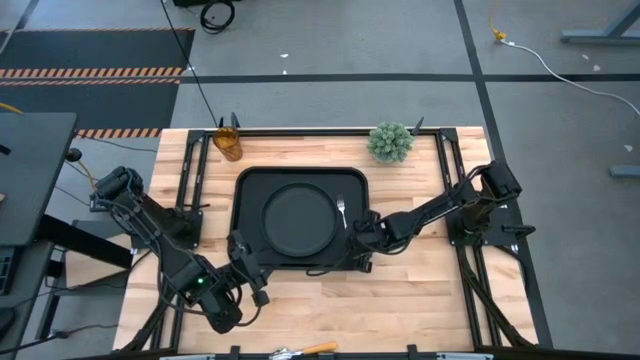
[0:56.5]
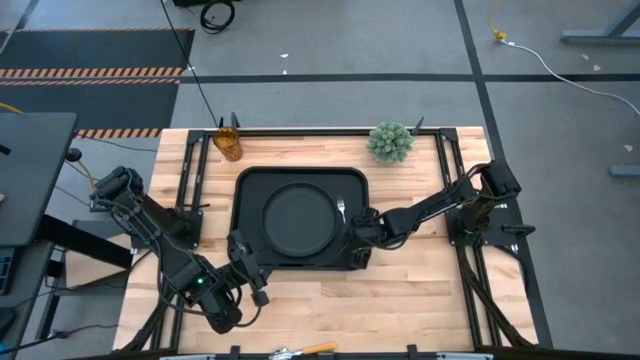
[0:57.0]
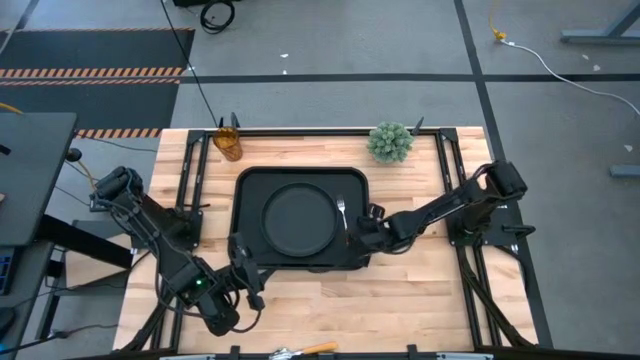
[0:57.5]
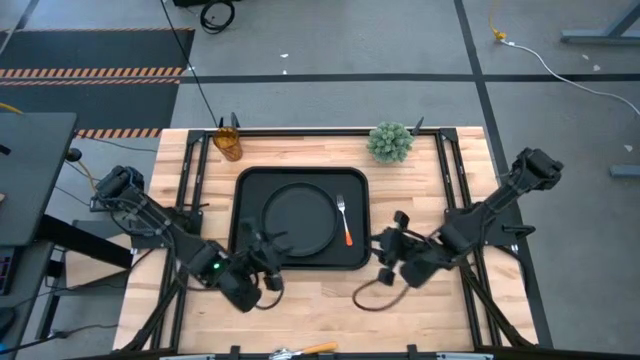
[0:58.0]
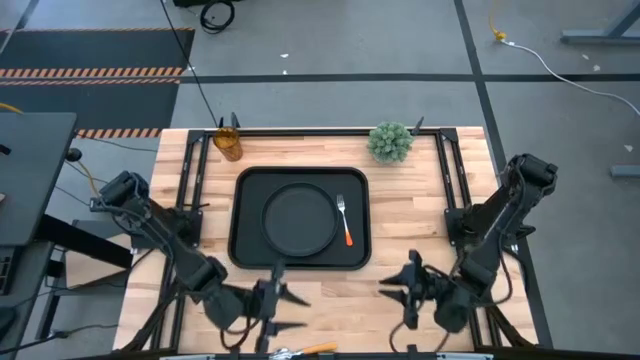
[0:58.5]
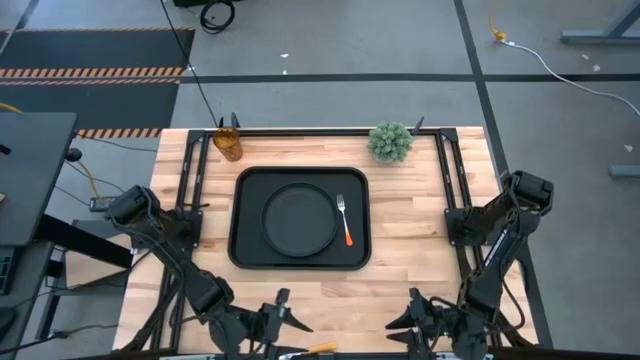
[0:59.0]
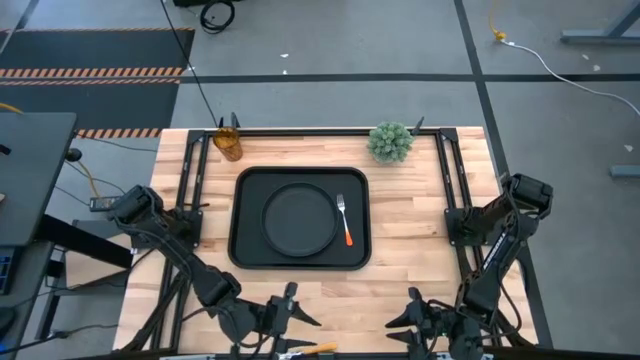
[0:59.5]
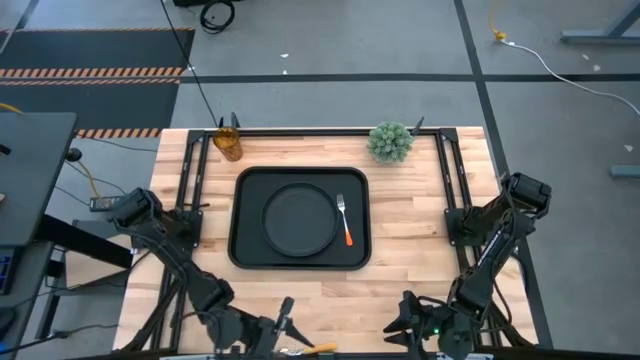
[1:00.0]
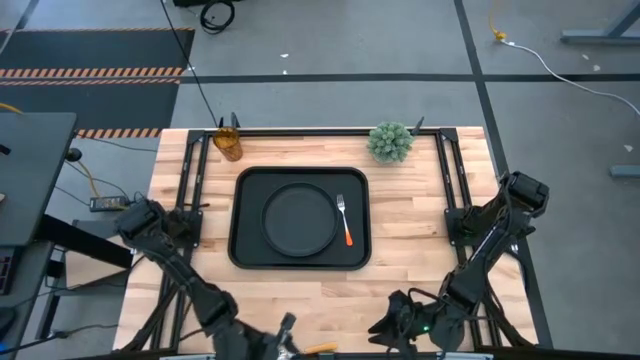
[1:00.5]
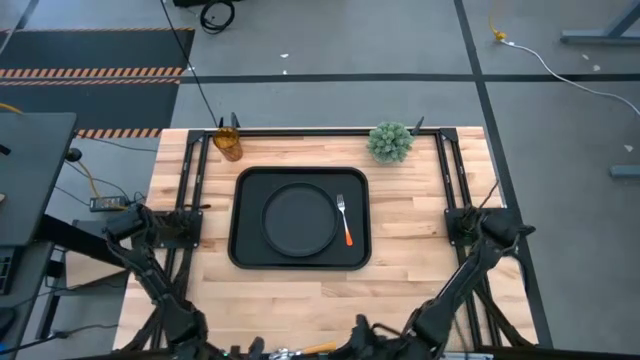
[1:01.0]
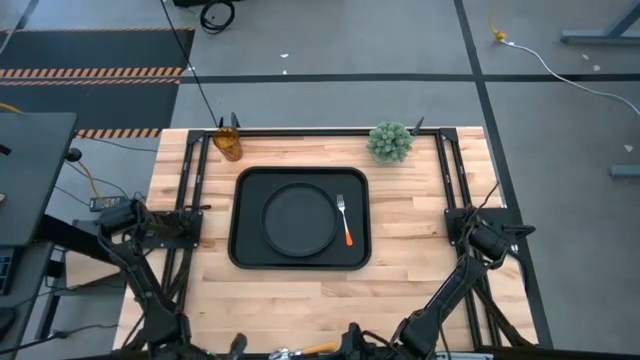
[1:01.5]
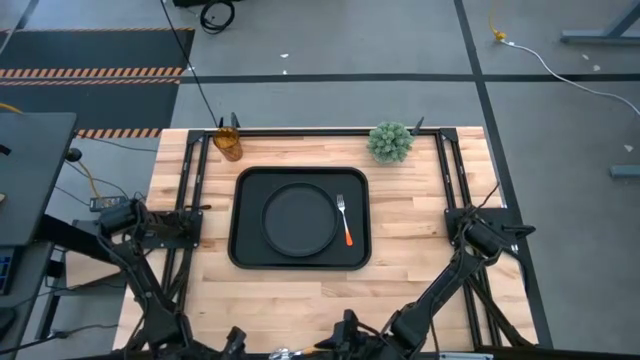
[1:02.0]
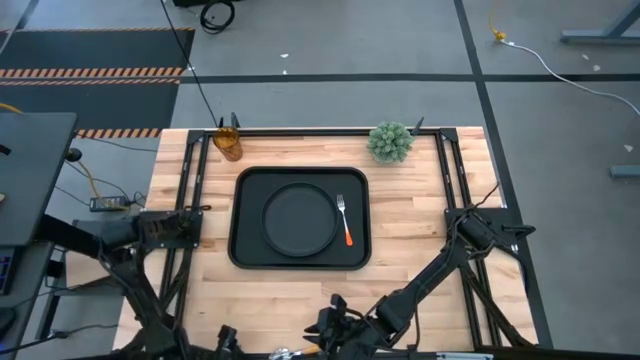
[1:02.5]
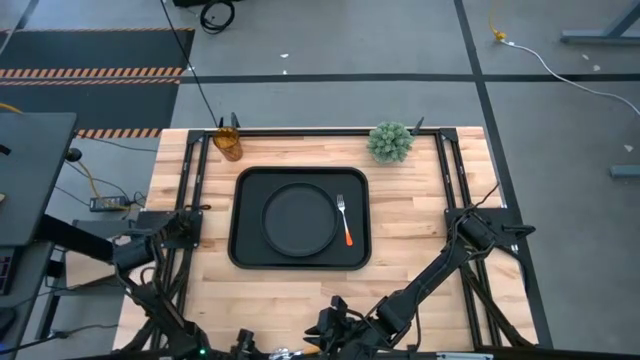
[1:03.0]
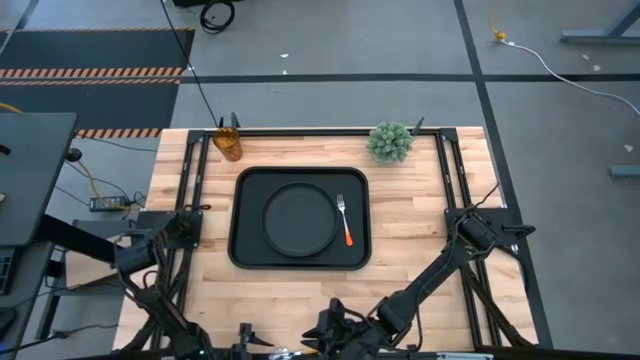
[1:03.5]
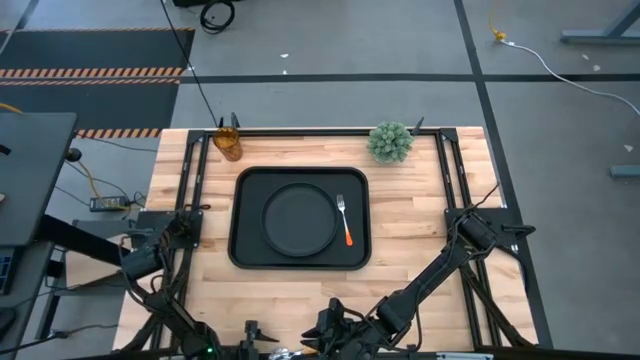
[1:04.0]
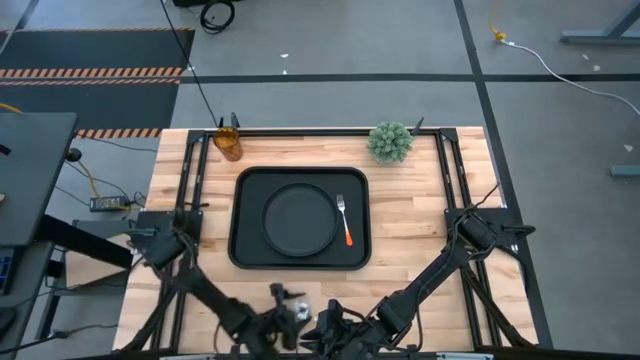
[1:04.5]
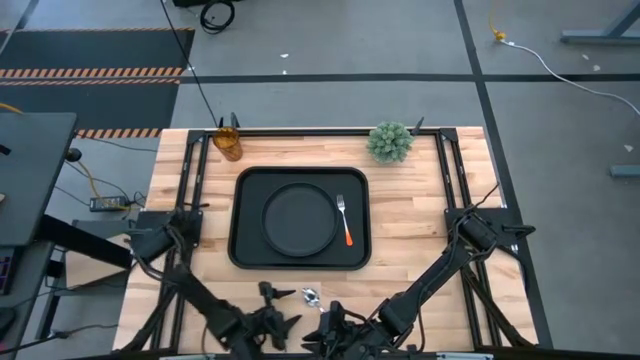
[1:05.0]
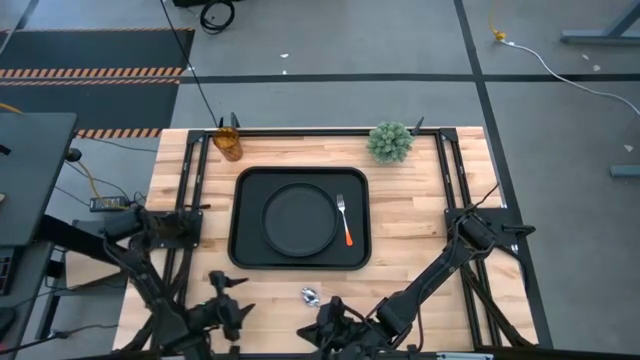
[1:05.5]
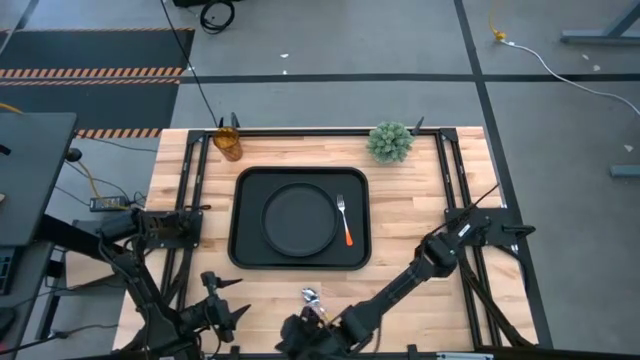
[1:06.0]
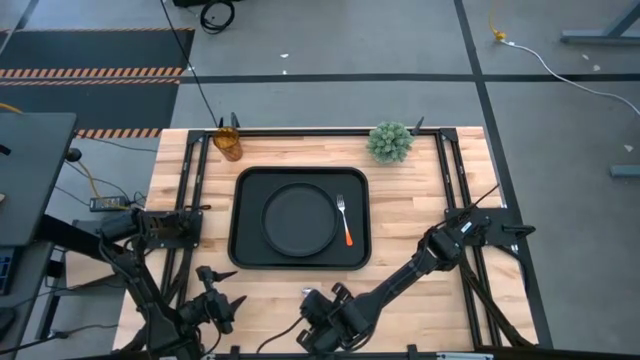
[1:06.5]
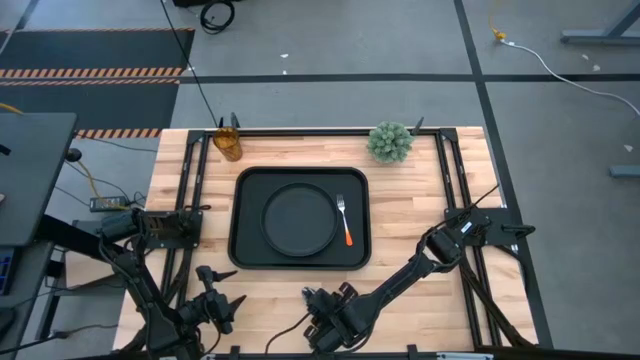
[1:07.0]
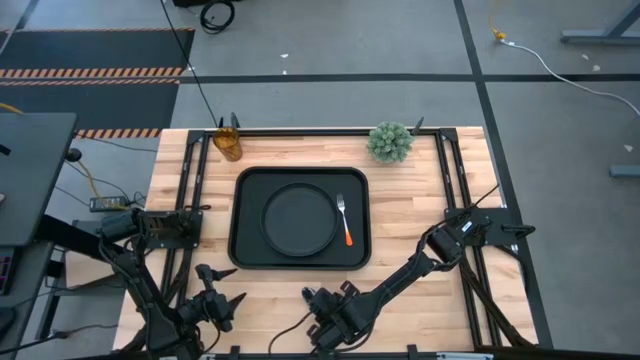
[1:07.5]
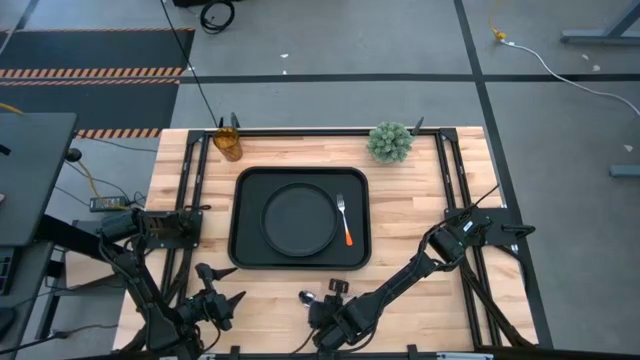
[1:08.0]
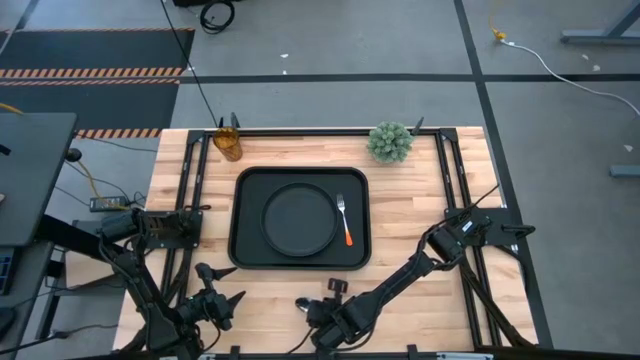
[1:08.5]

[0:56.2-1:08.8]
Task: Pick and place plate/cup/fork/spoon on tray
Put the yellow spoon on the black serving tray to the right of the orange fork

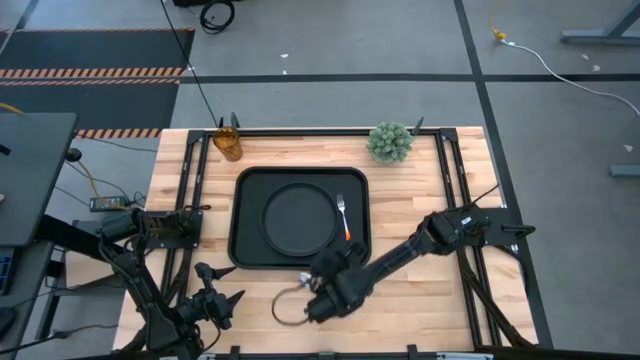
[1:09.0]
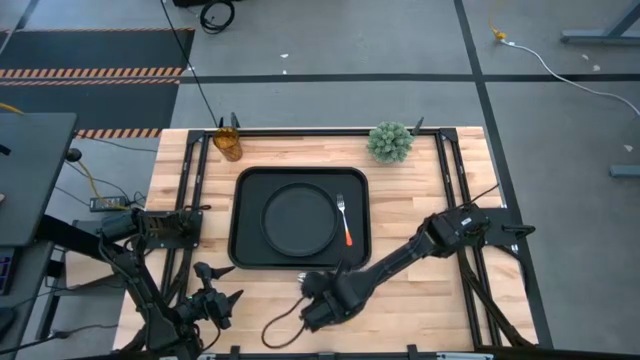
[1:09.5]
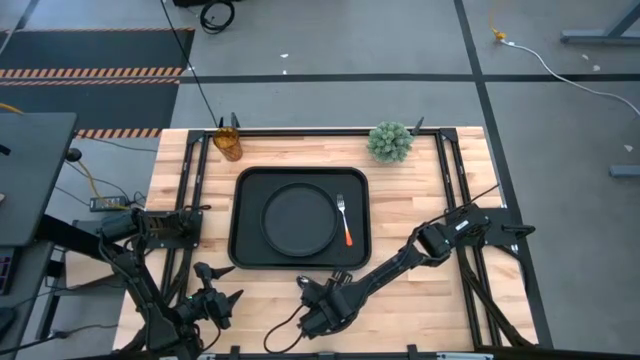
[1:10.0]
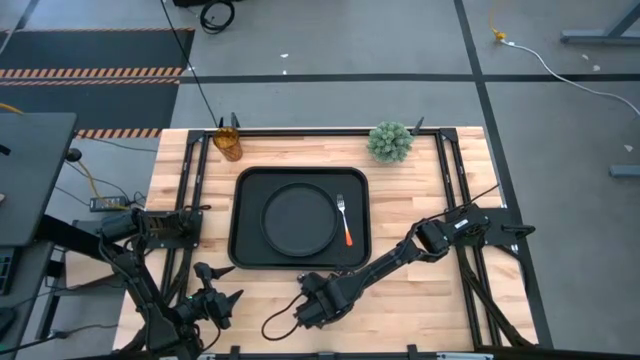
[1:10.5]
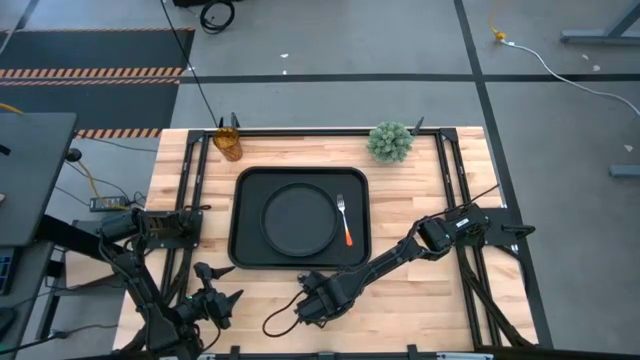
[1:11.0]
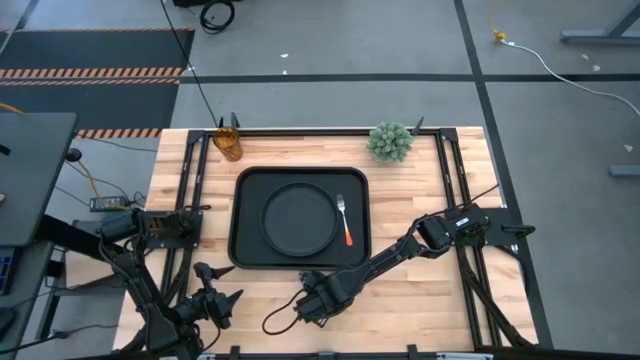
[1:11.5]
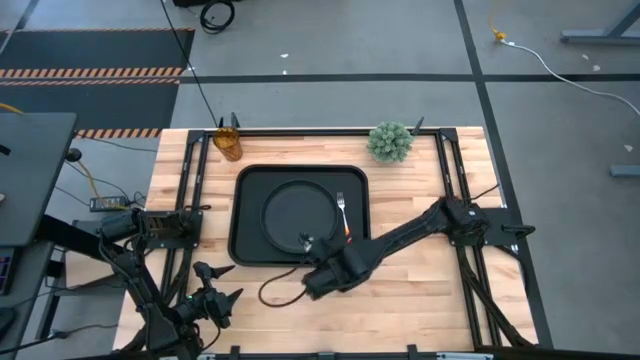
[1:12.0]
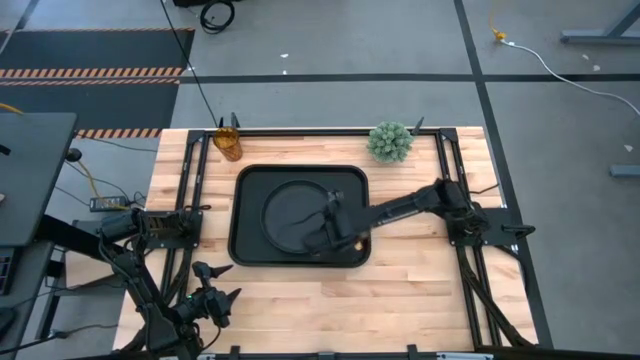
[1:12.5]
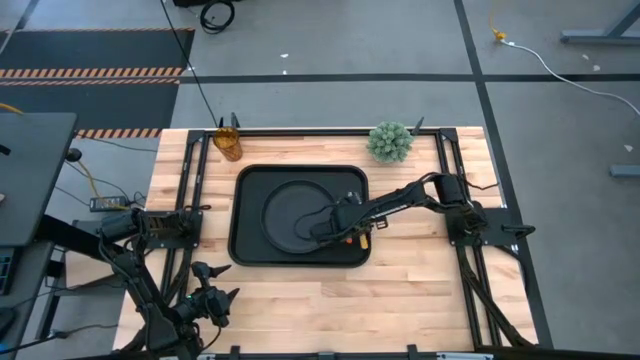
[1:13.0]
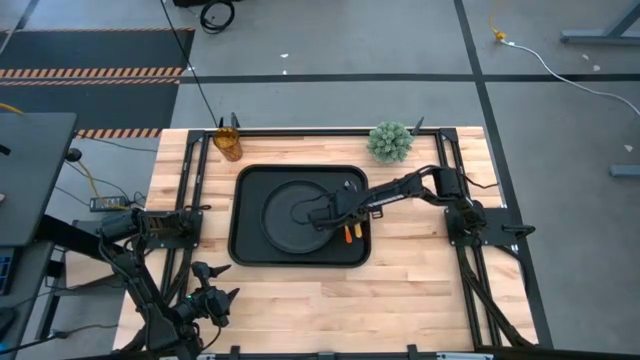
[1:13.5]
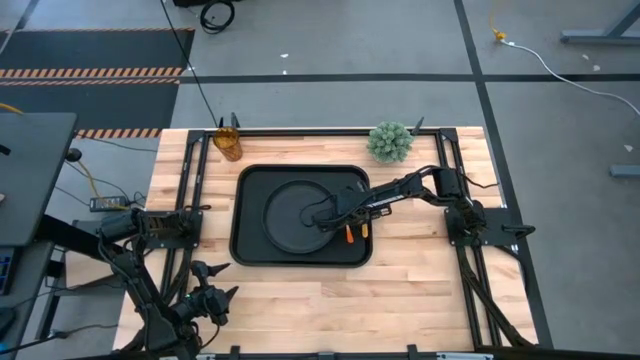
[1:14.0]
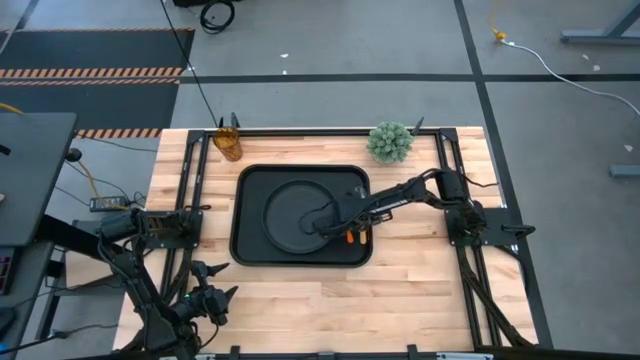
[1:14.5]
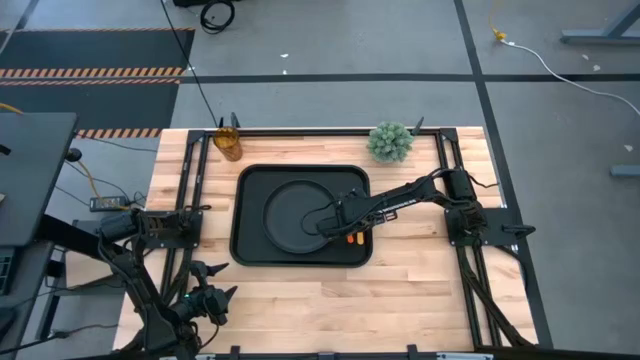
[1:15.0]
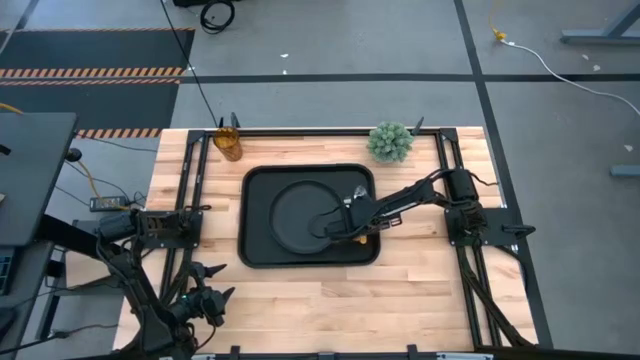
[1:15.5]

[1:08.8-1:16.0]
Put the yellow spoon on the black serving tray to the right of the orange fork

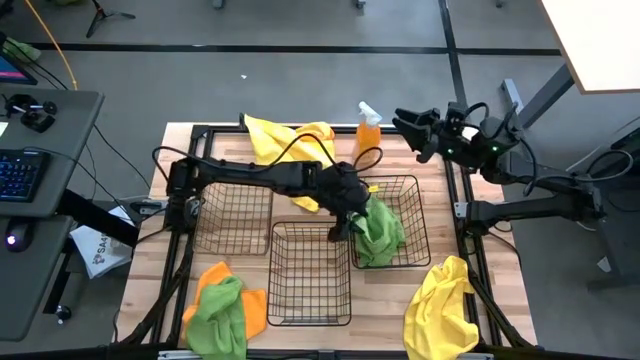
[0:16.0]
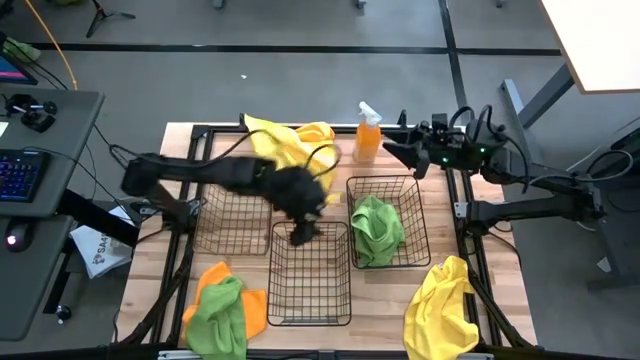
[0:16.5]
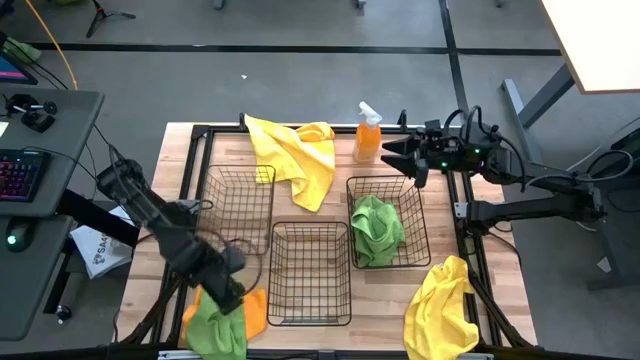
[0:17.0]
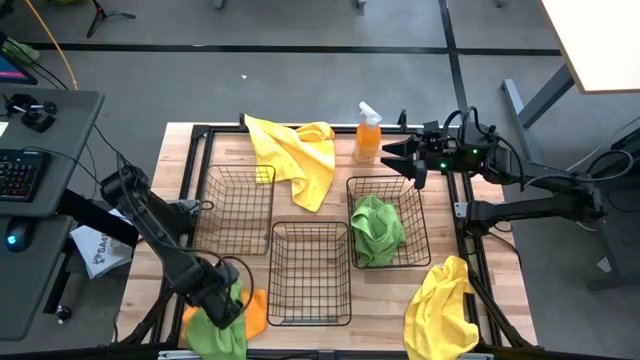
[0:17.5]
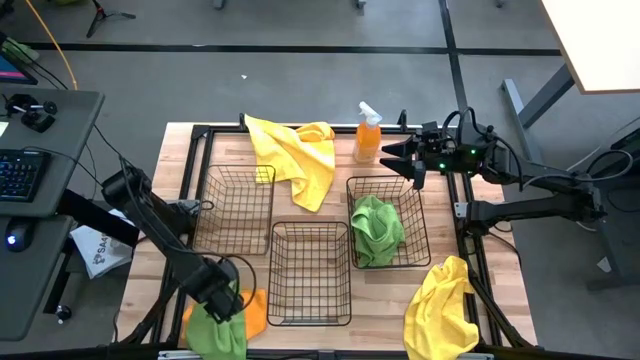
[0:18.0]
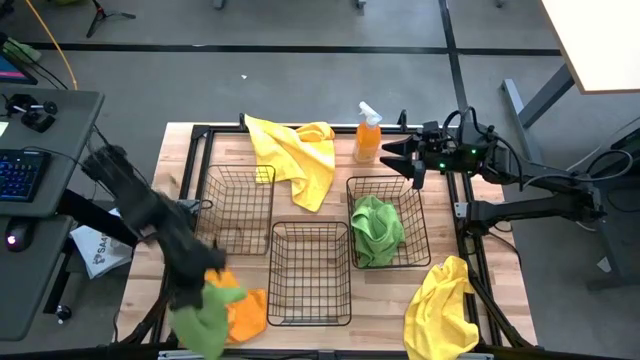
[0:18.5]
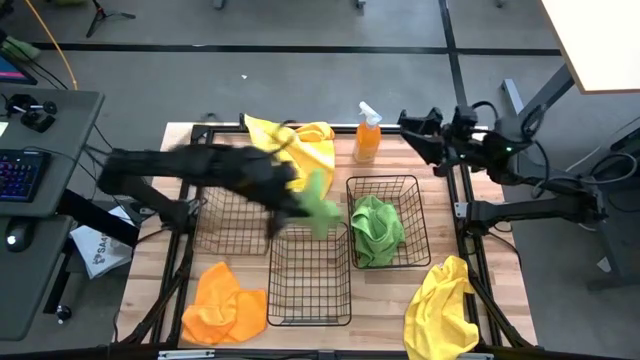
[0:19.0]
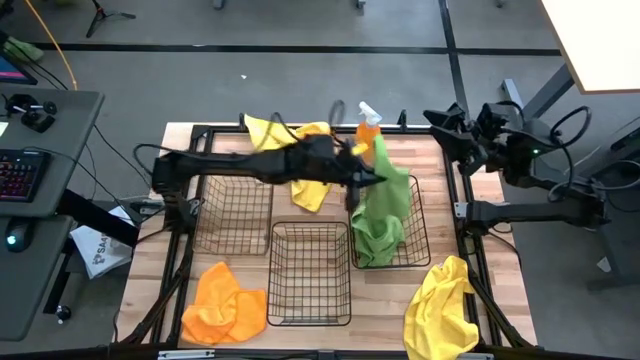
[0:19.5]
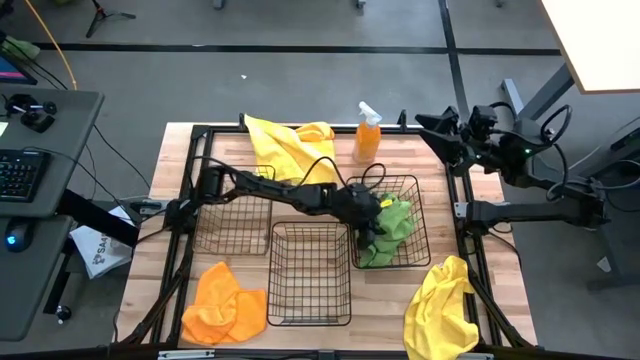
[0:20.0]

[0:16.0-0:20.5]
Task: Sort microfiber towel by color & place in baskets
Put the green microfiber cloth into the right basket
